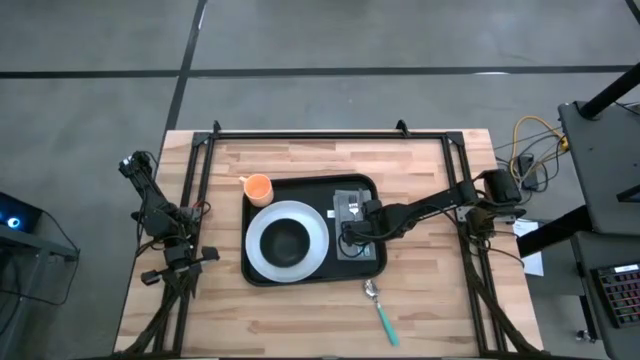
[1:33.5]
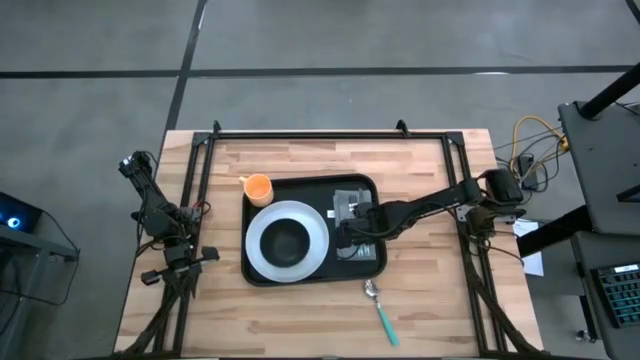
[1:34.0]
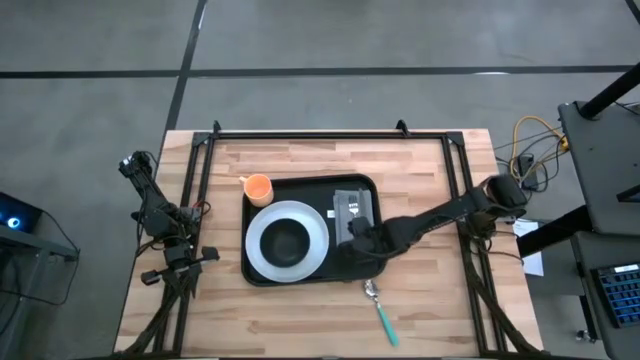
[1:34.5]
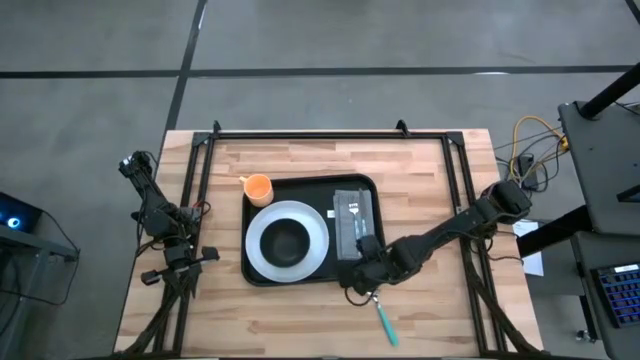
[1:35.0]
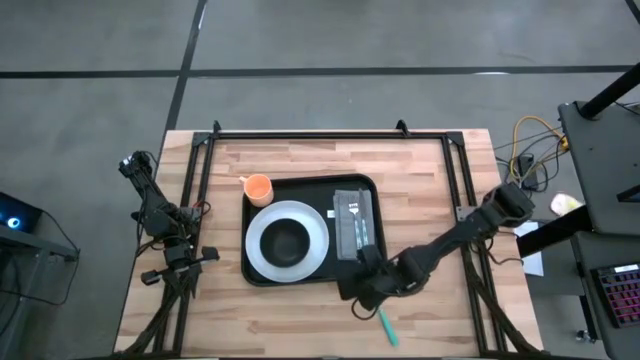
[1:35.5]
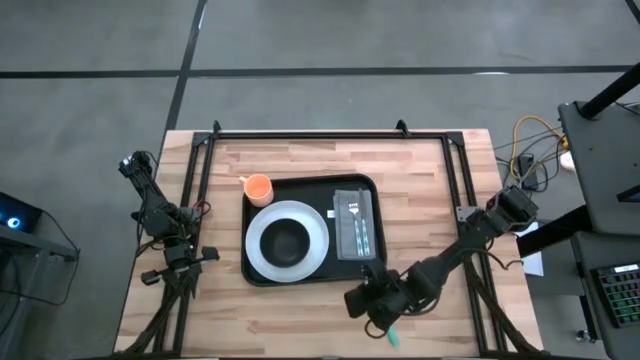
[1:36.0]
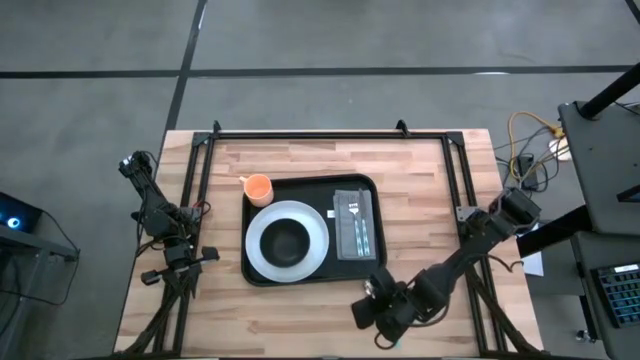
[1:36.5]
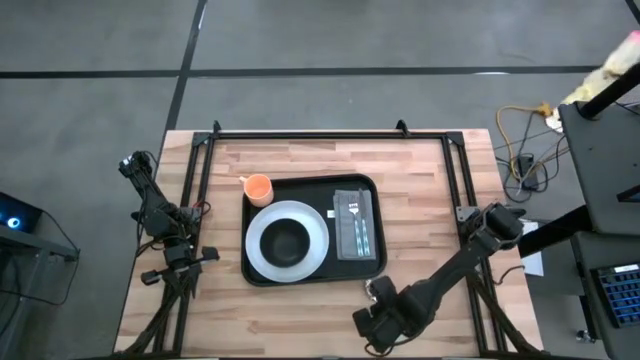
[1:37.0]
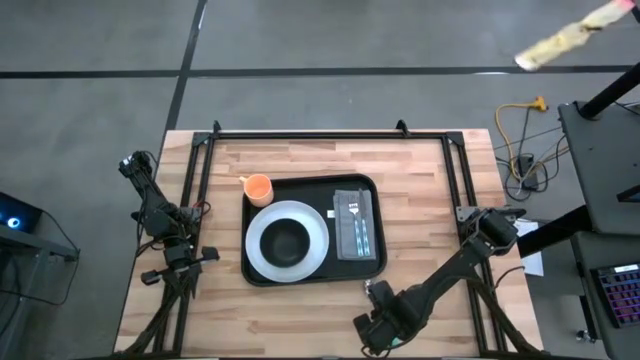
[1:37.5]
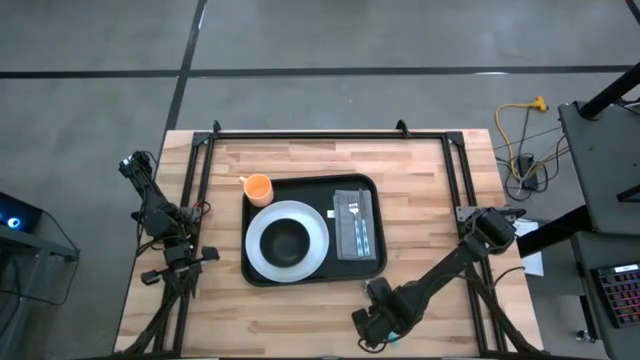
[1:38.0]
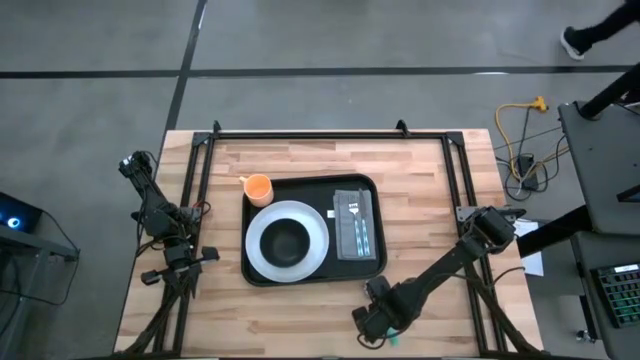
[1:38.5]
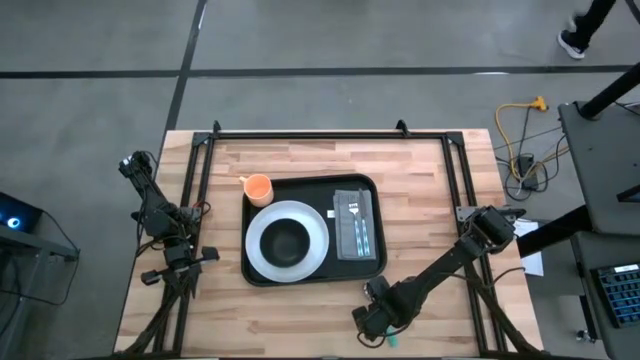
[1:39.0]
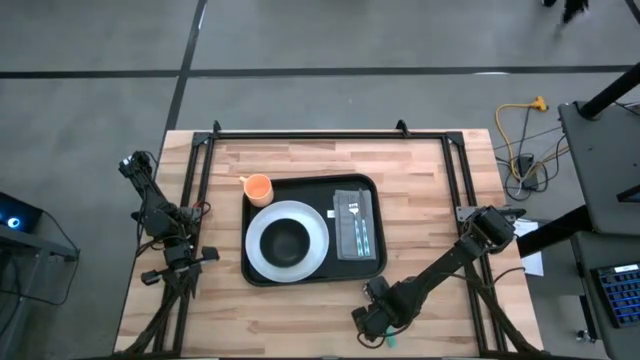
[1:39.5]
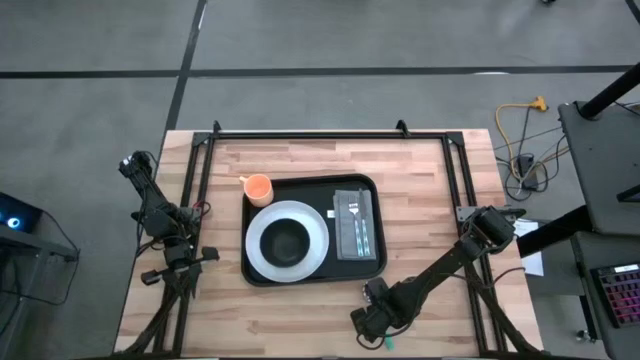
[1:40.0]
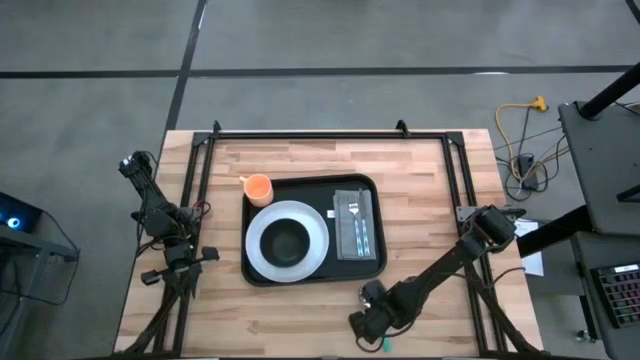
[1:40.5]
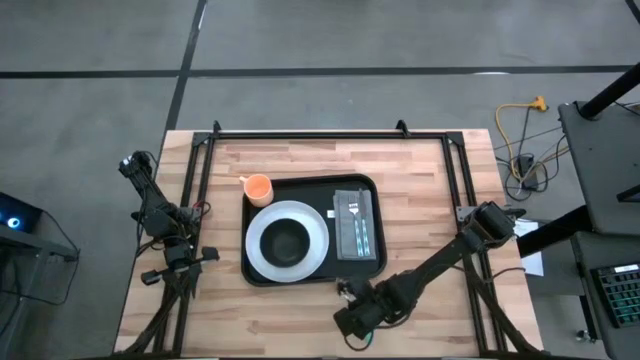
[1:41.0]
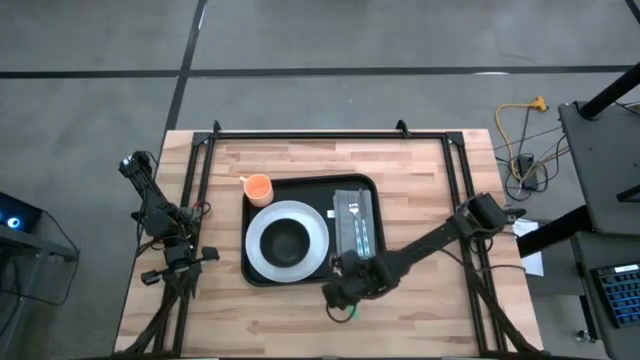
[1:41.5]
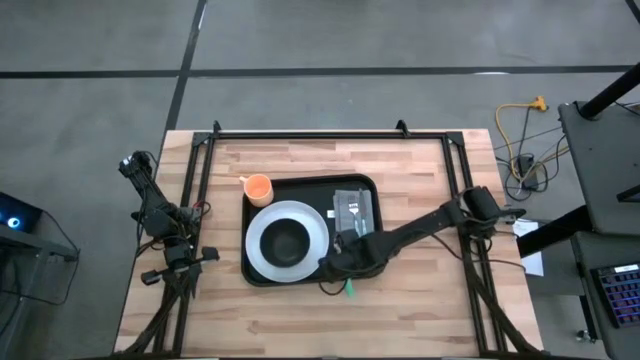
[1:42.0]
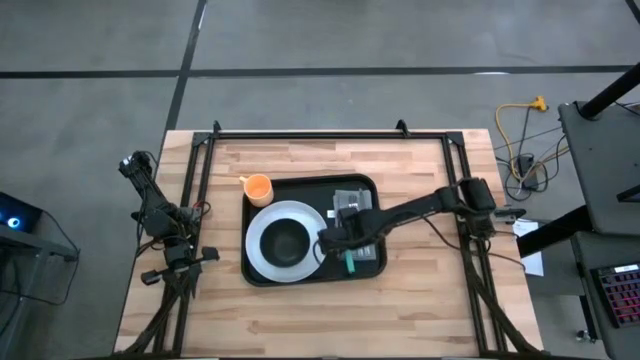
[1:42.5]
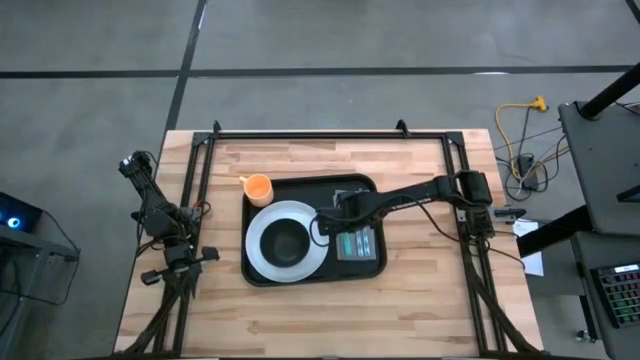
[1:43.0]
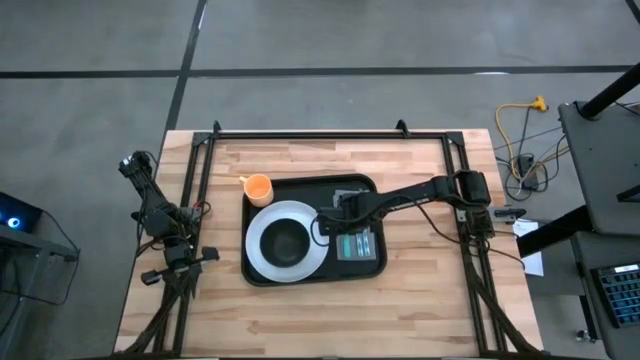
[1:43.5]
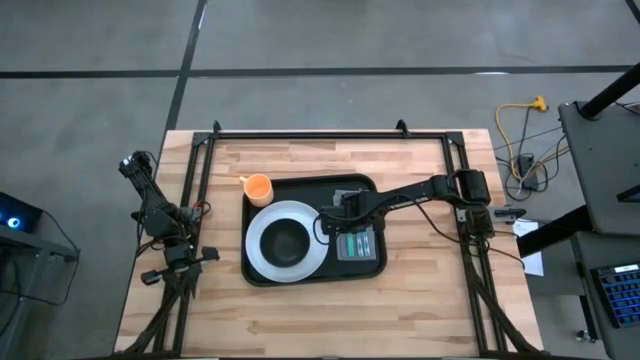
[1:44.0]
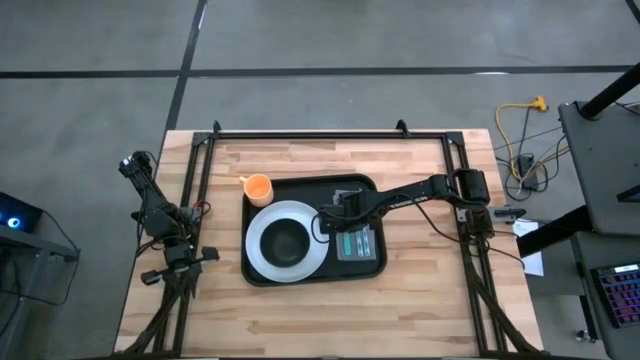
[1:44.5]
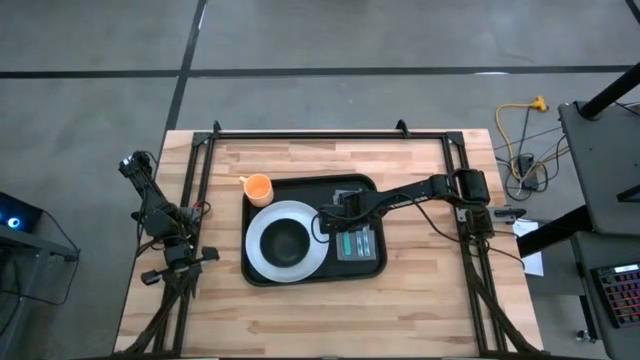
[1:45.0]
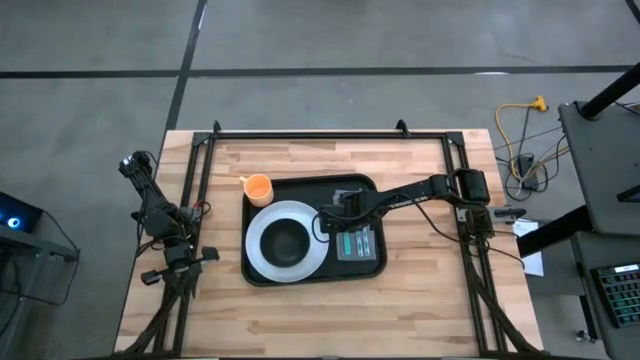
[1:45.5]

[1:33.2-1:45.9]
Task: Set up tray
Put the light green spoon on the gray table napkin to the left of the green fork

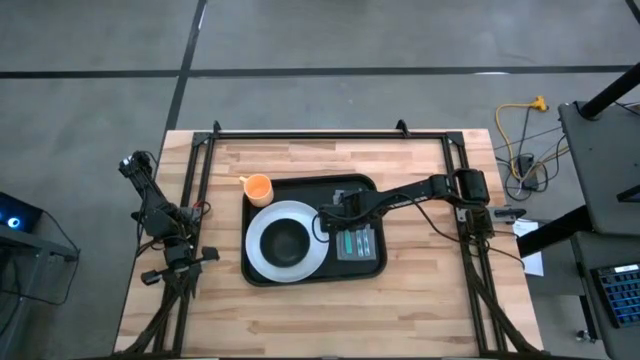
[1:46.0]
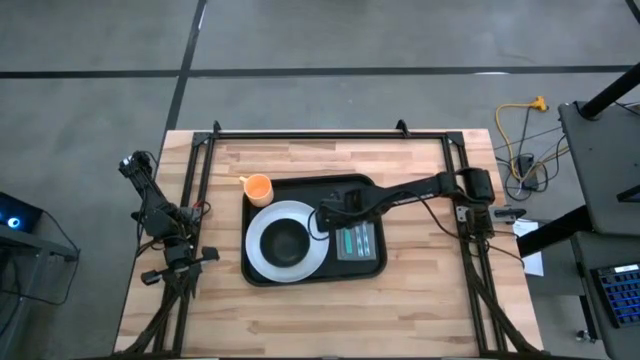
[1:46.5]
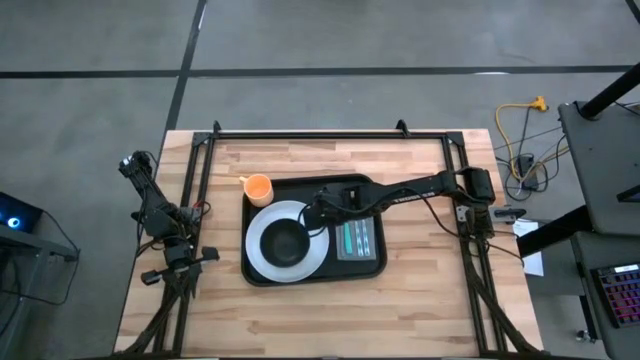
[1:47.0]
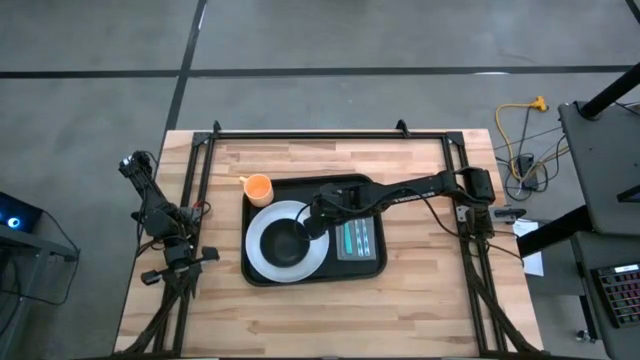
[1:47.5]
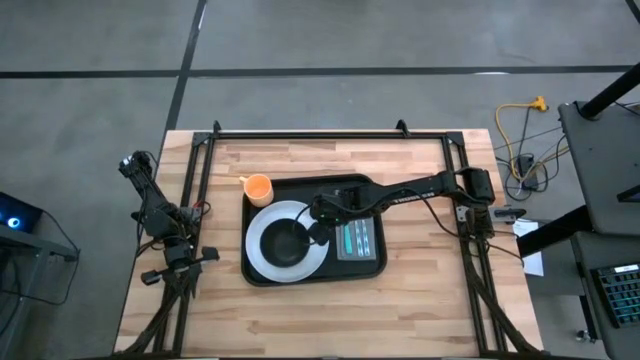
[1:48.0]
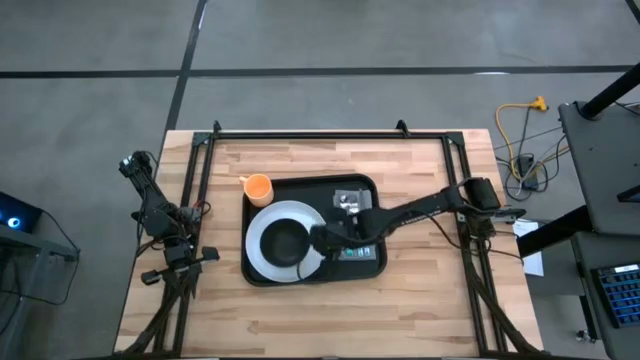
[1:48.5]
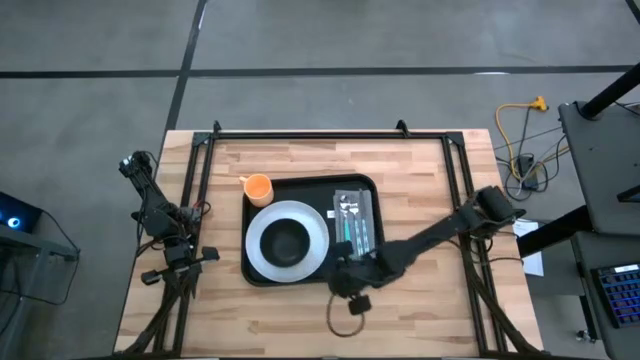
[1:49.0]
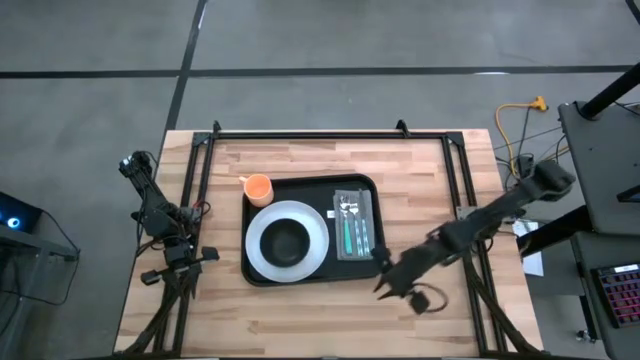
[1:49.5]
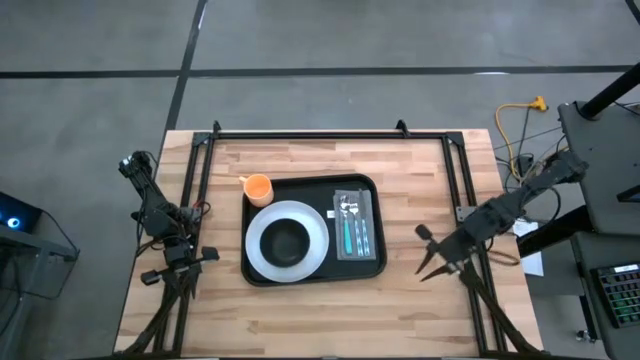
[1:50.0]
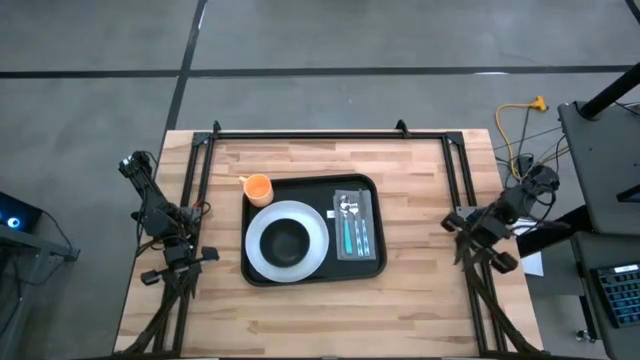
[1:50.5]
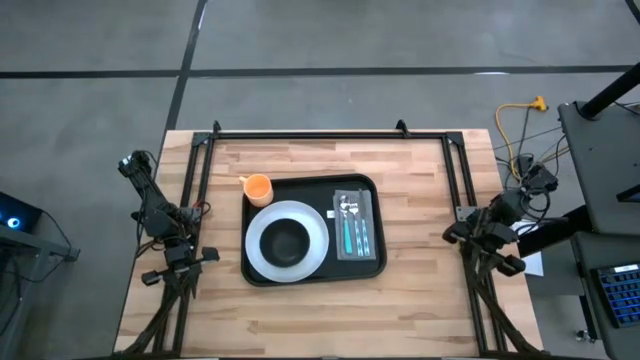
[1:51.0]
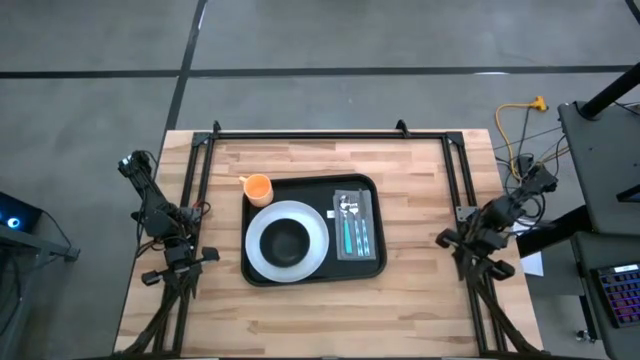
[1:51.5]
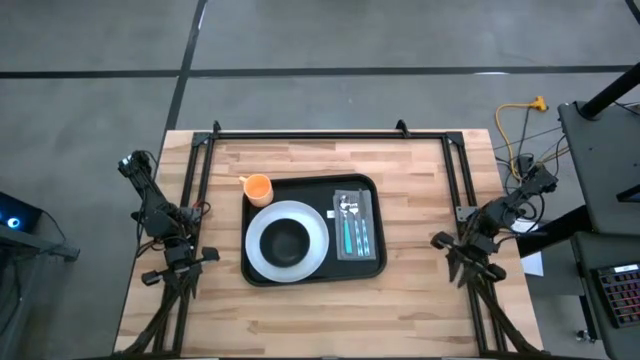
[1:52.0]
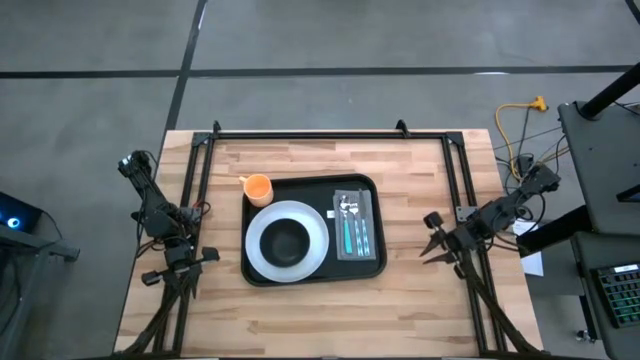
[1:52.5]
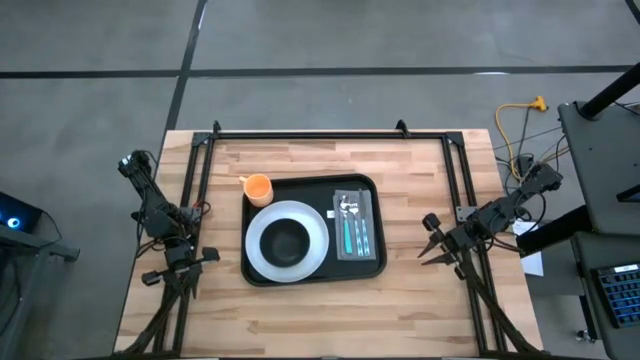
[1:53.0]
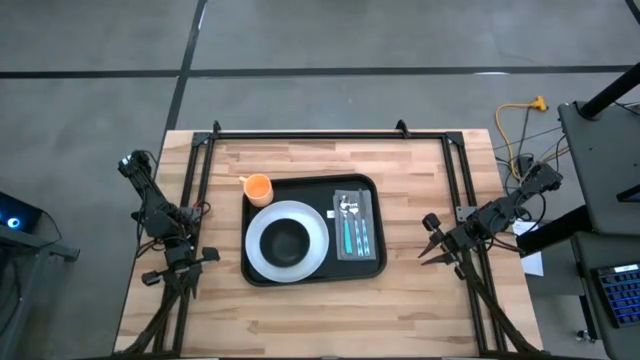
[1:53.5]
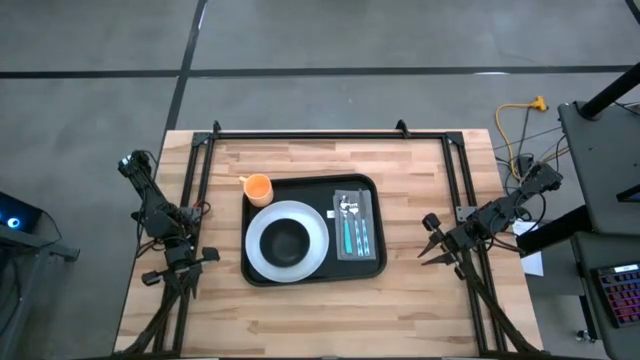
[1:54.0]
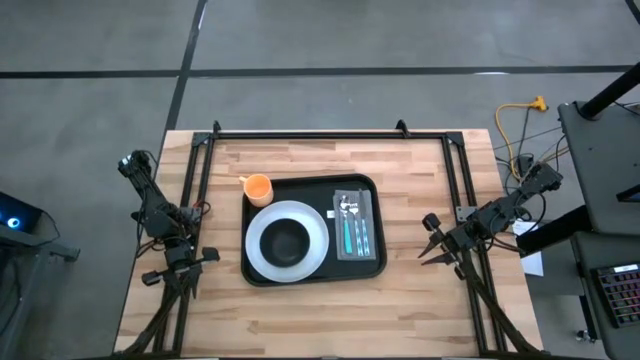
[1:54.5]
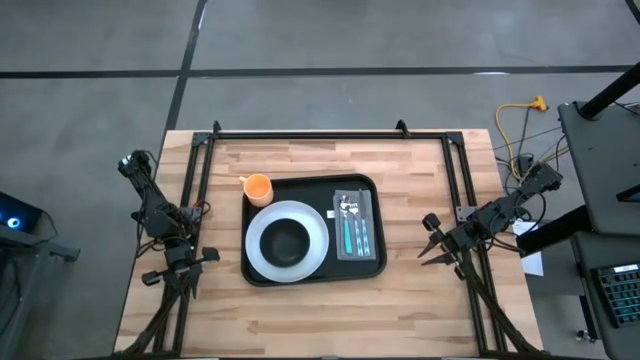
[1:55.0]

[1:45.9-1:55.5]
Return to Home Position
